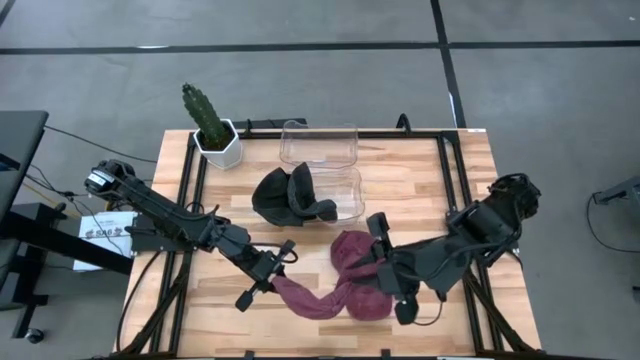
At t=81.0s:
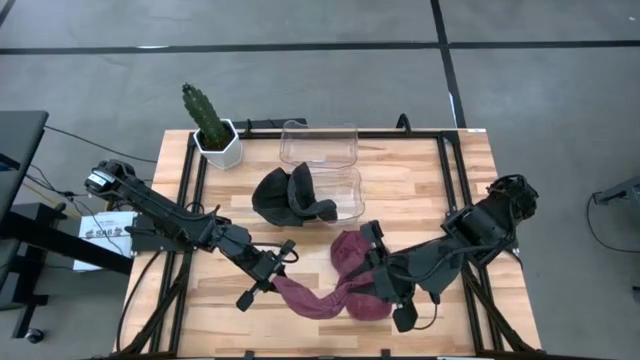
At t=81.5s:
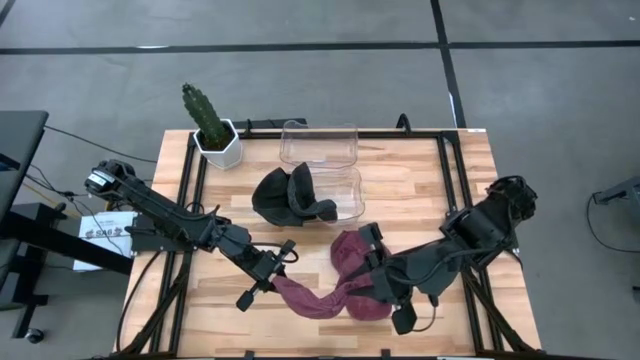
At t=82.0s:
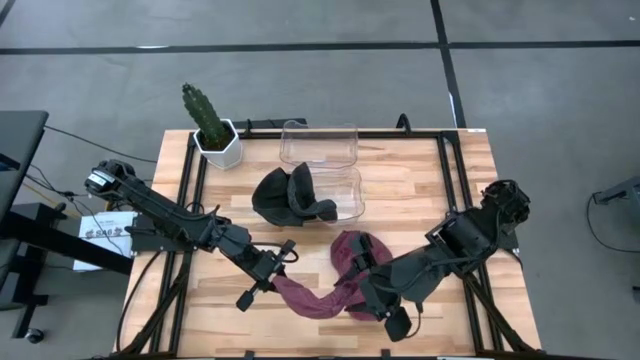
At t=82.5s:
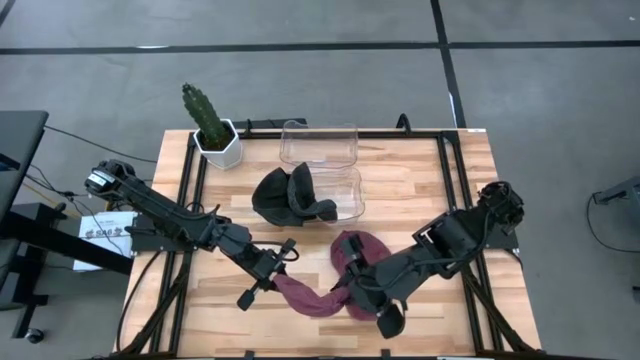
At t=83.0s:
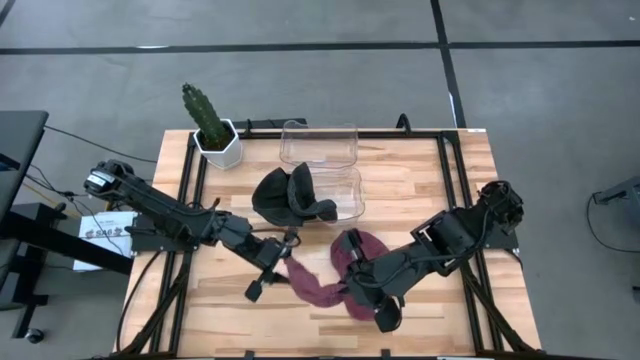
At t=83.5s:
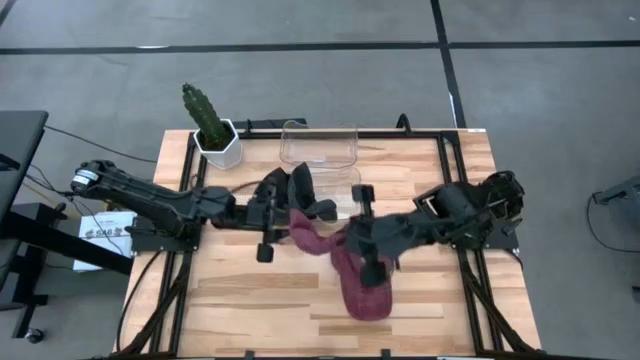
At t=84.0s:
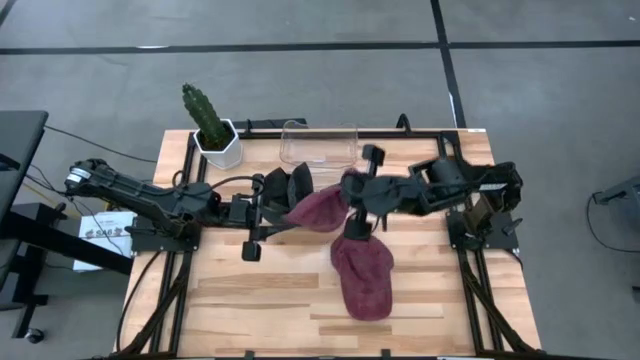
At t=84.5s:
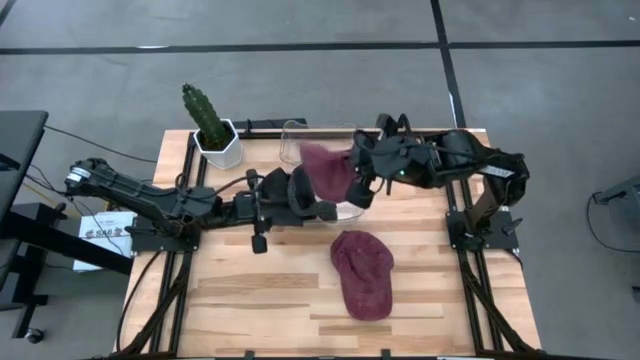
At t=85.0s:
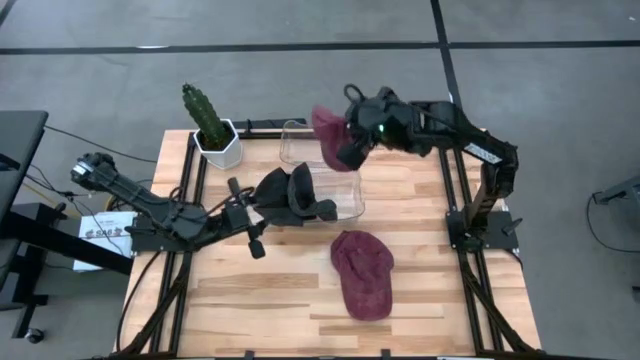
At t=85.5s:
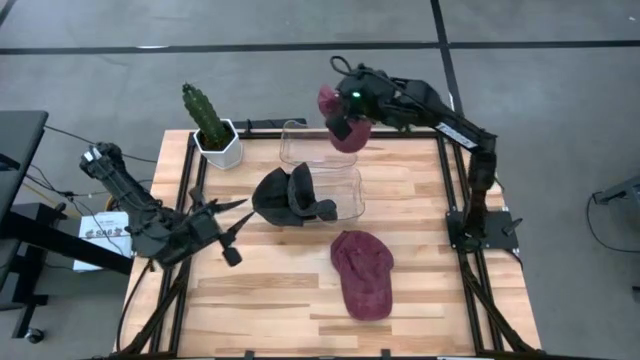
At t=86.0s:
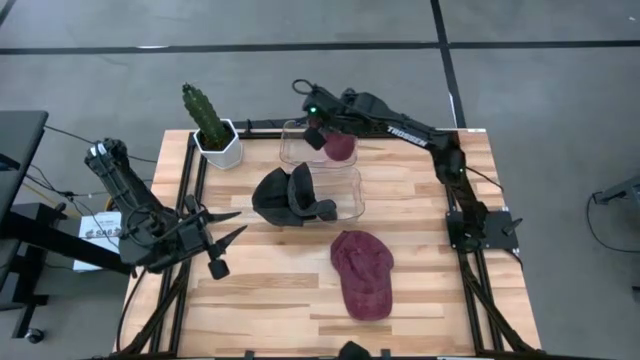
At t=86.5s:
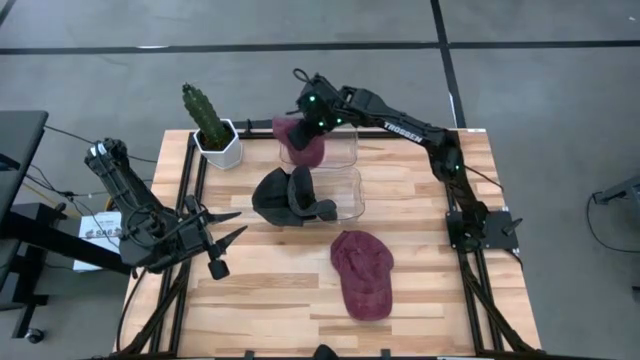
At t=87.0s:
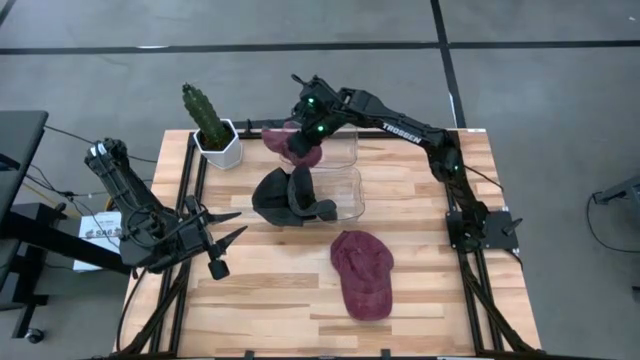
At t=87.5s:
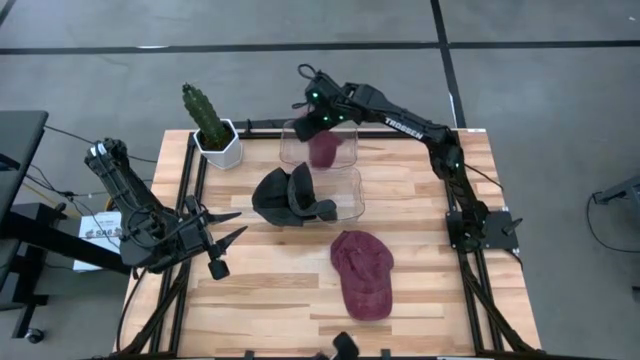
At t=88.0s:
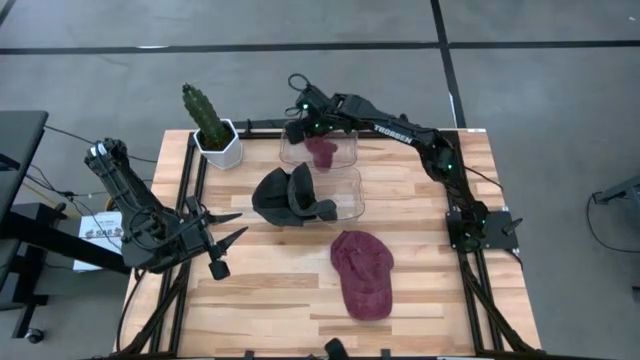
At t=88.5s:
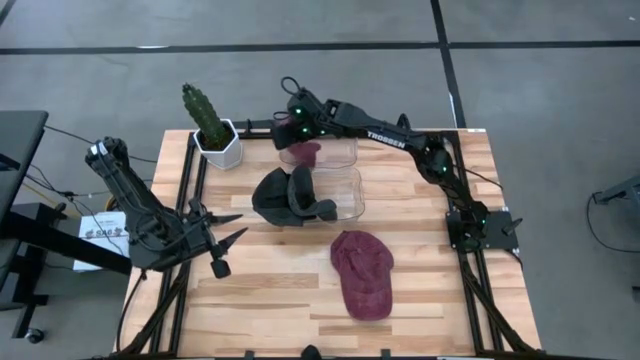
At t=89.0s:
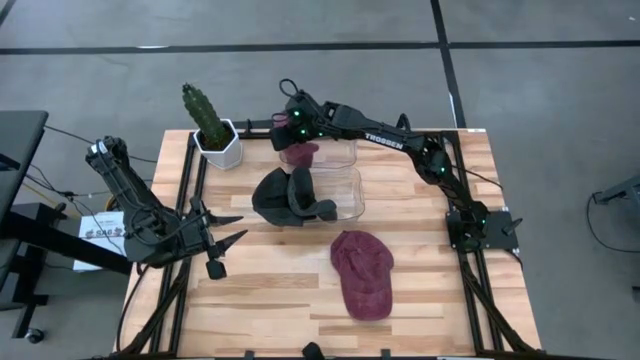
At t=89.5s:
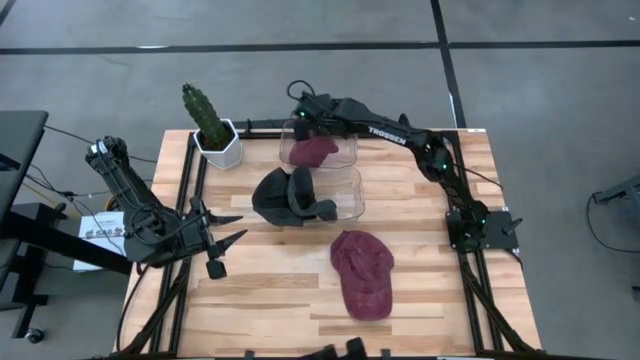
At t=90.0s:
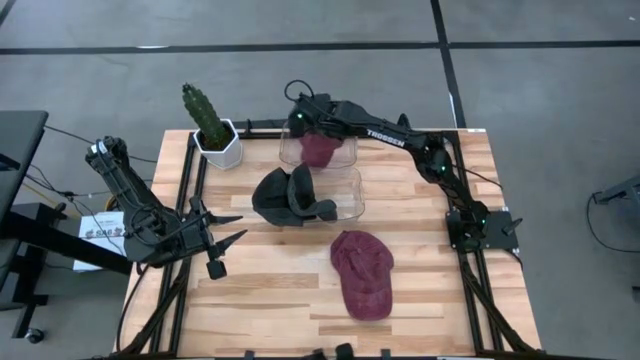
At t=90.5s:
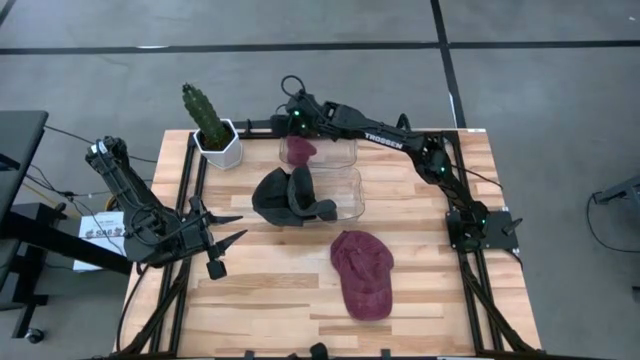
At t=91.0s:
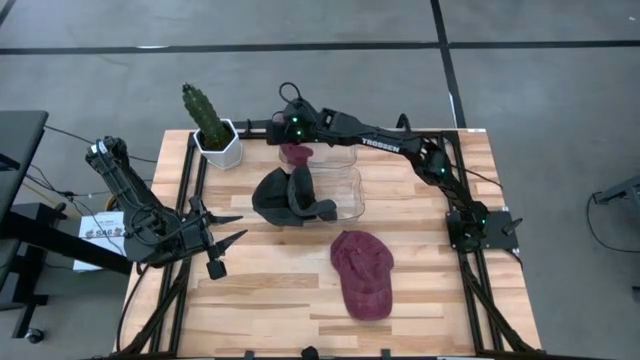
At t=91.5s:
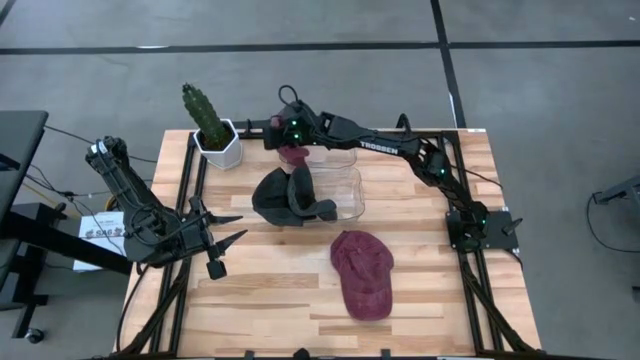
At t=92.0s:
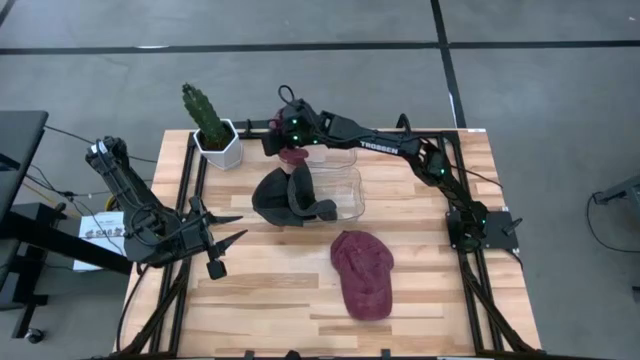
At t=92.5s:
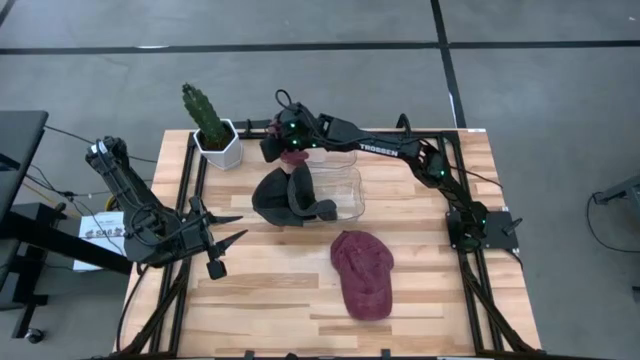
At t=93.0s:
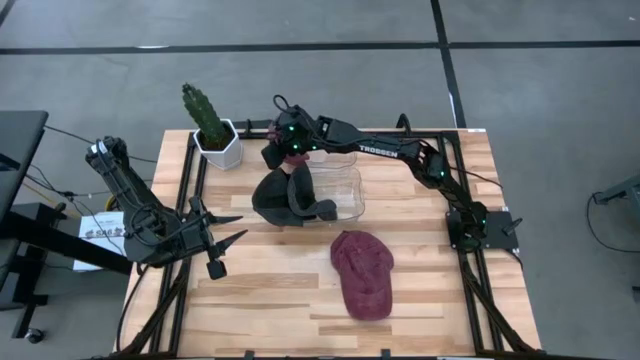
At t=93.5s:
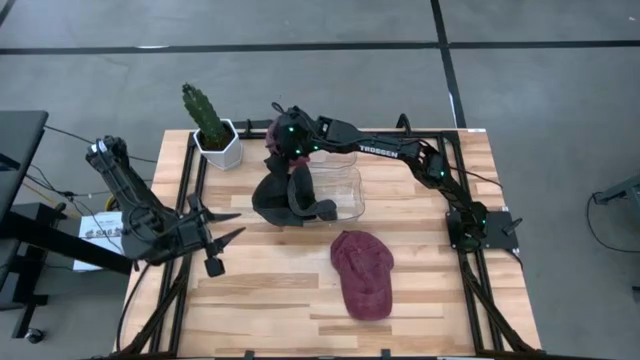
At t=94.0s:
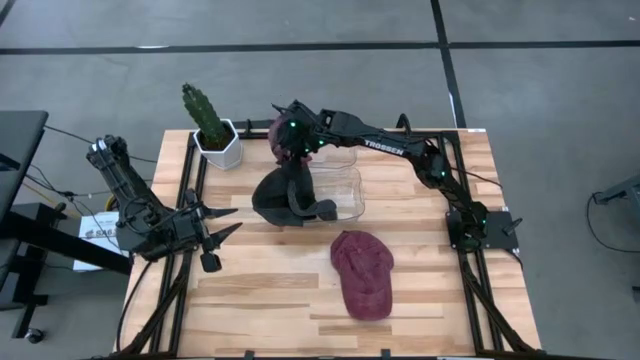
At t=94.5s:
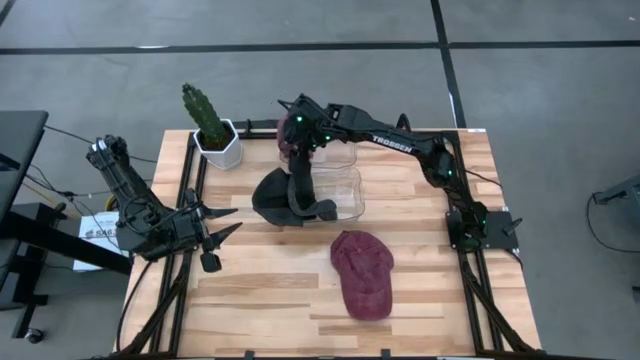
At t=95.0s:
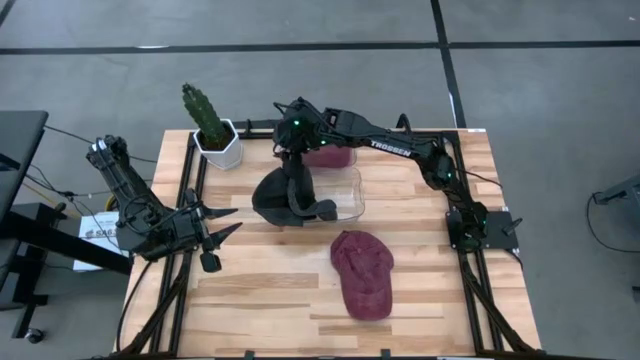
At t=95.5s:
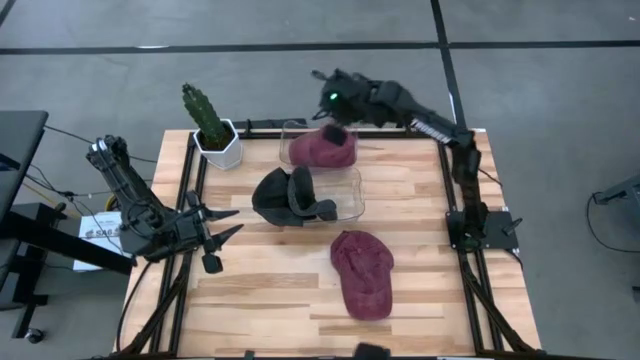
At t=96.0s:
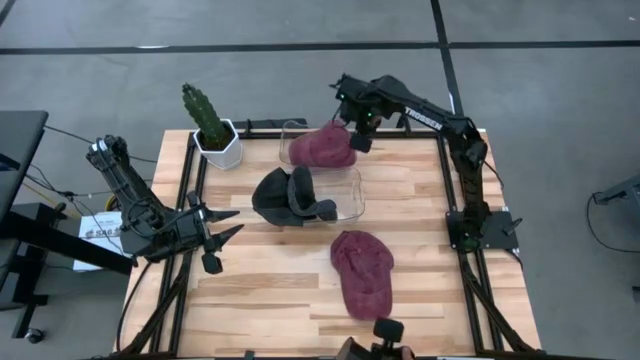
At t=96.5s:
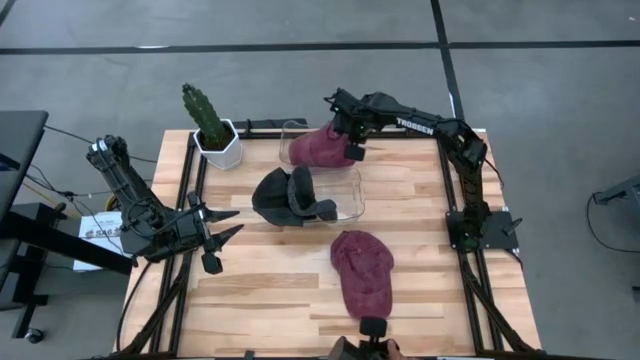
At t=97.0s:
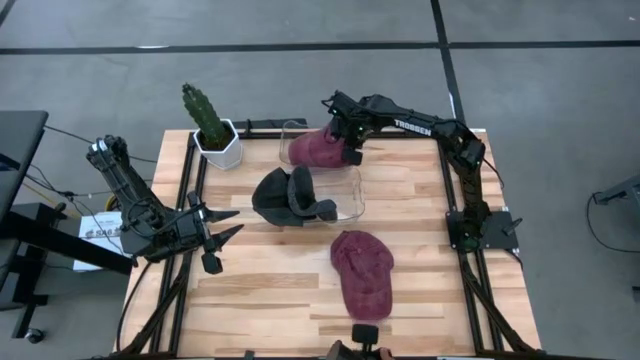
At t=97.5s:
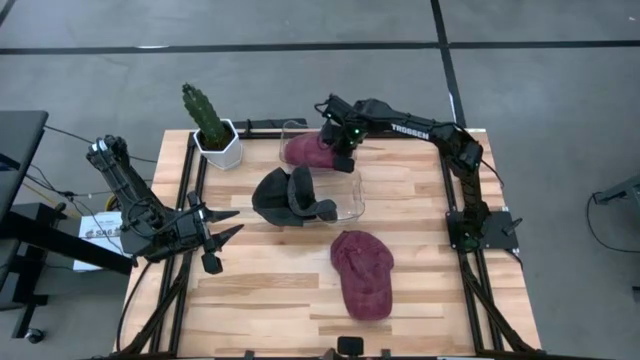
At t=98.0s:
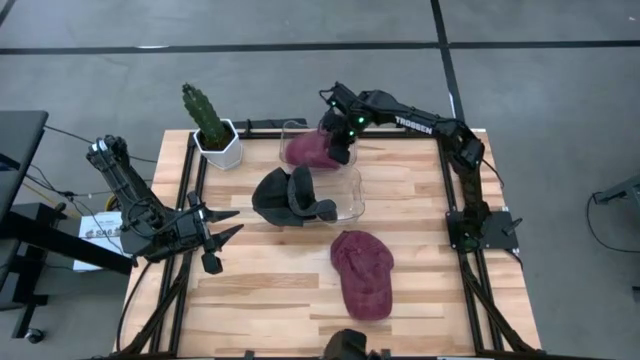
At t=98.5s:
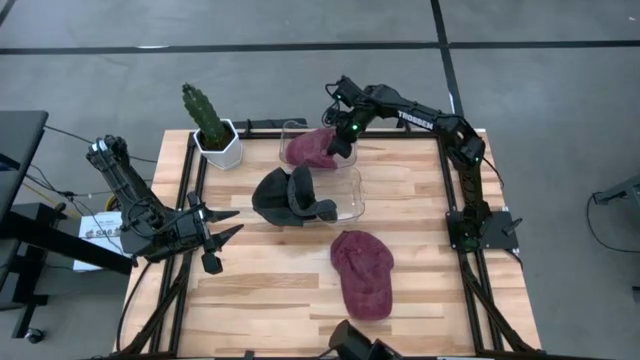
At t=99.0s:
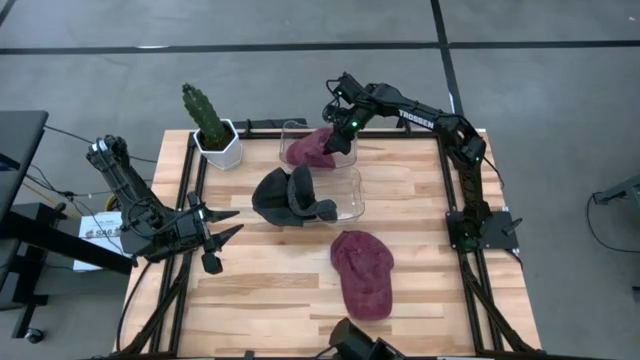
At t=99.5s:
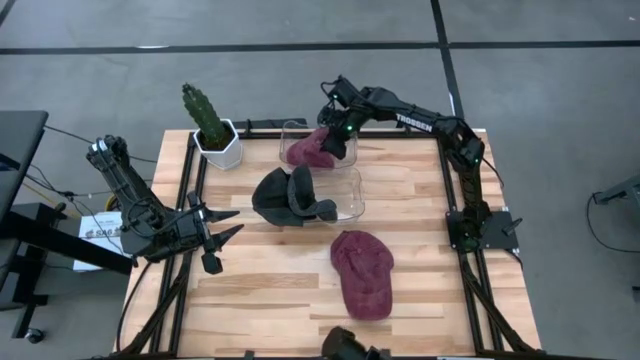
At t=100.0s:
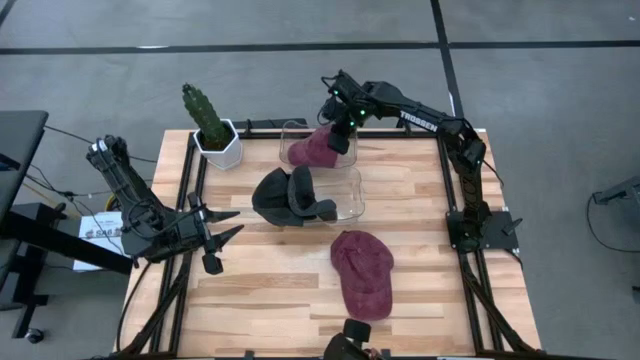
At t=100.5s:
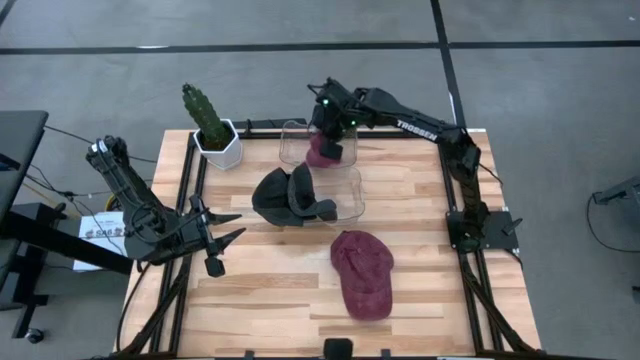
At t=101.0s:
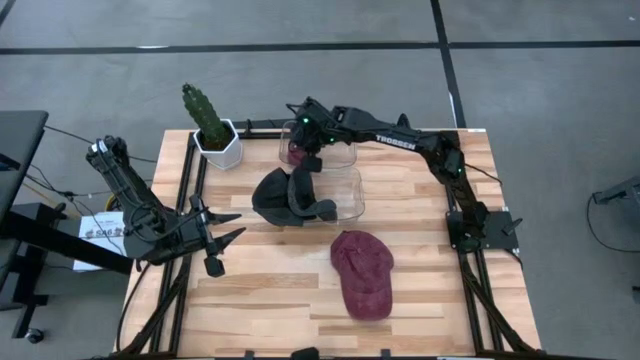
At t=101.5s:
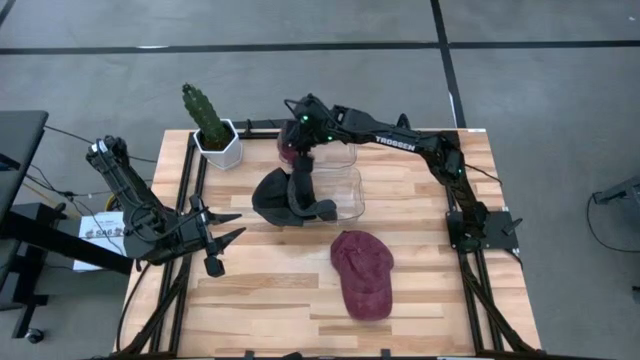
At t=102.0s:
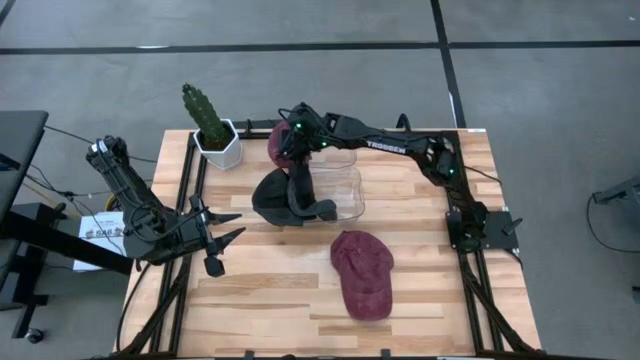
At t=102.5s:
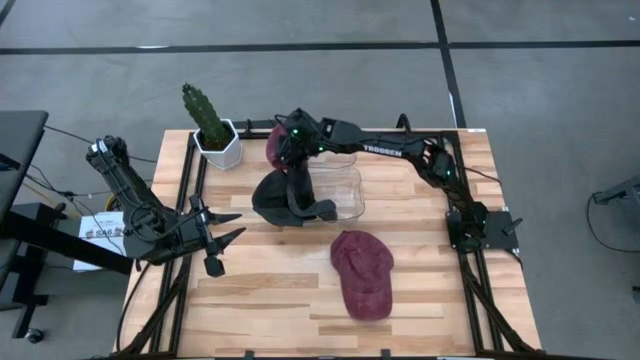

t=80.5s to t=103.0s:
Task: Pick & Place hat
Put the top red cap into the top transparent bin
